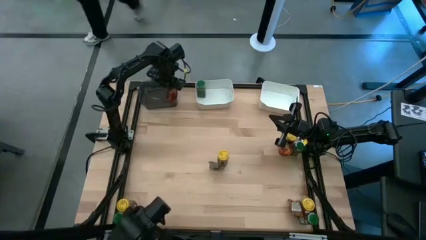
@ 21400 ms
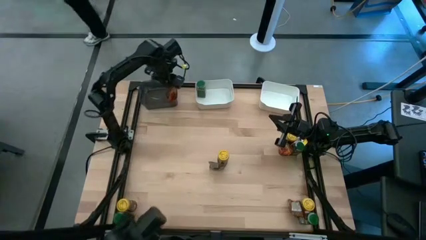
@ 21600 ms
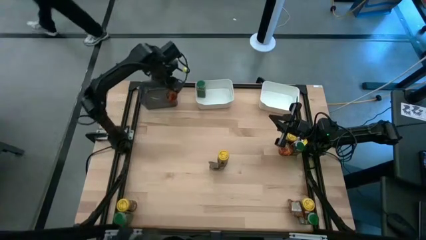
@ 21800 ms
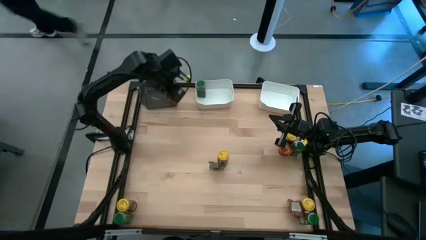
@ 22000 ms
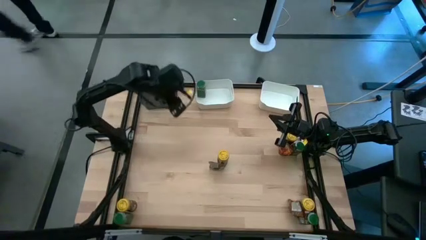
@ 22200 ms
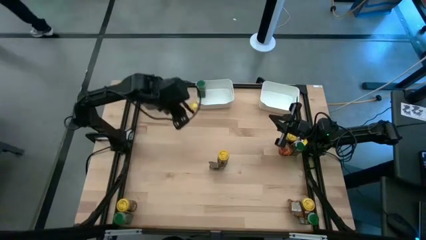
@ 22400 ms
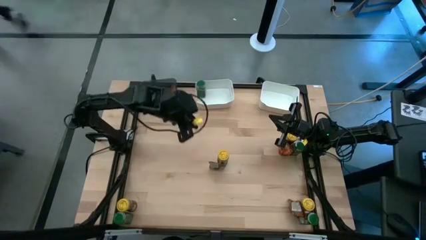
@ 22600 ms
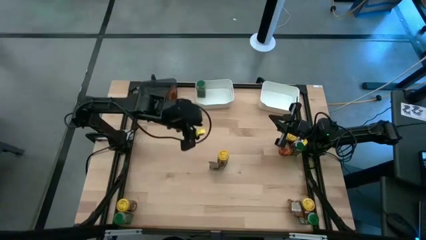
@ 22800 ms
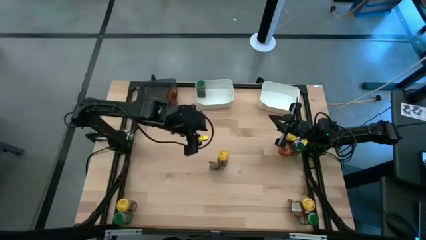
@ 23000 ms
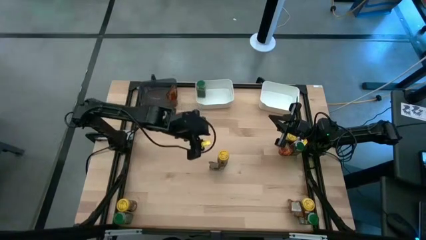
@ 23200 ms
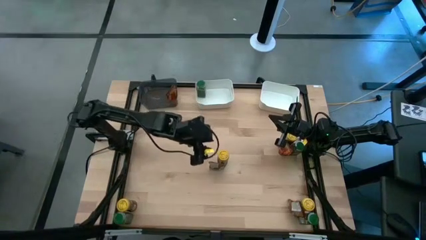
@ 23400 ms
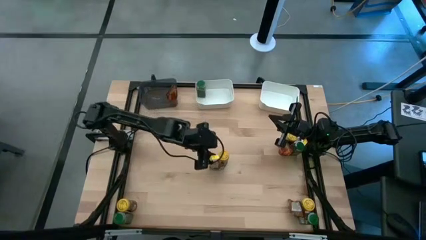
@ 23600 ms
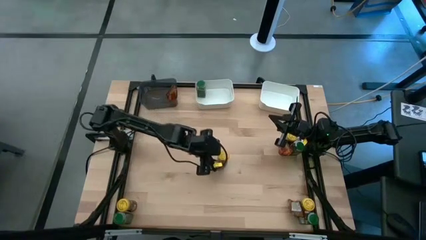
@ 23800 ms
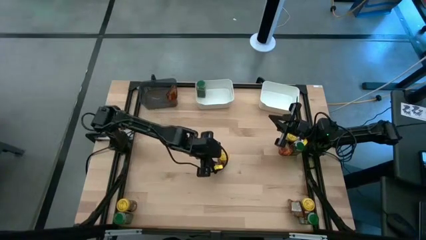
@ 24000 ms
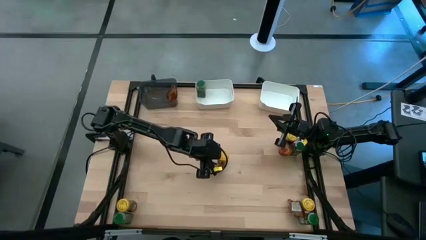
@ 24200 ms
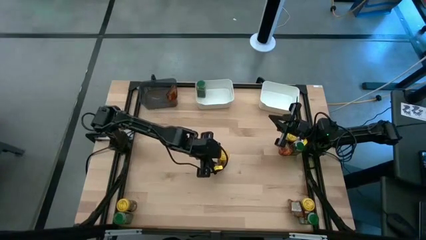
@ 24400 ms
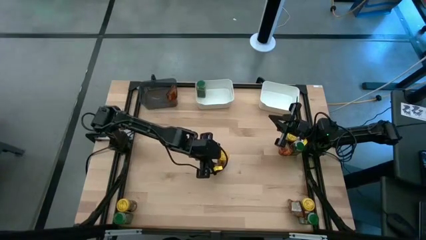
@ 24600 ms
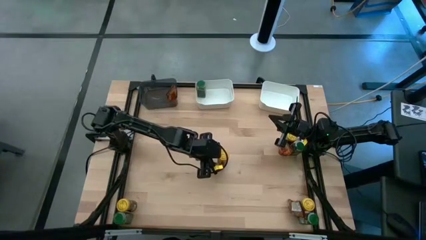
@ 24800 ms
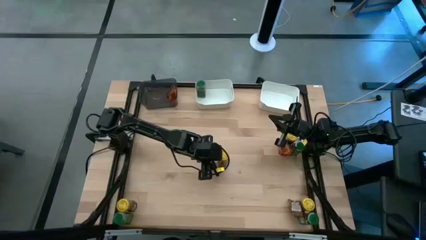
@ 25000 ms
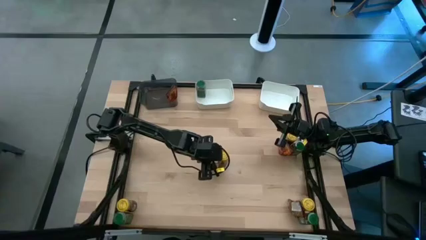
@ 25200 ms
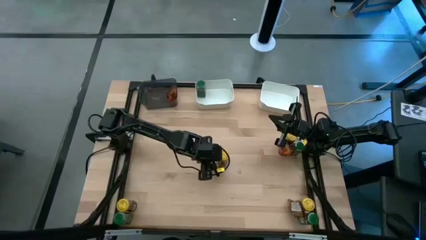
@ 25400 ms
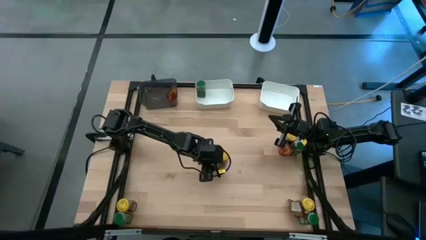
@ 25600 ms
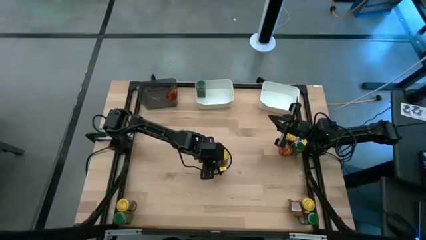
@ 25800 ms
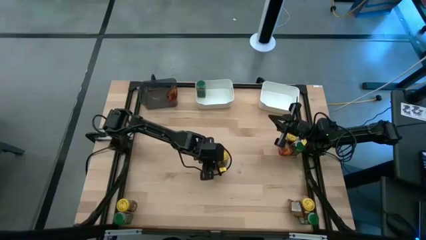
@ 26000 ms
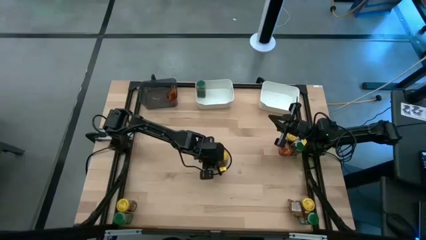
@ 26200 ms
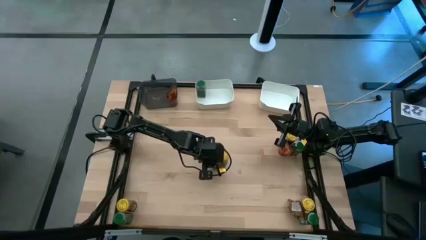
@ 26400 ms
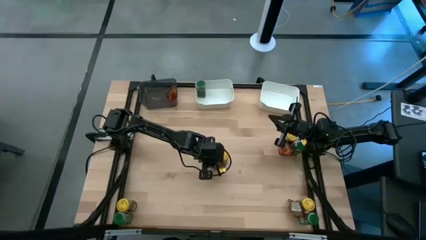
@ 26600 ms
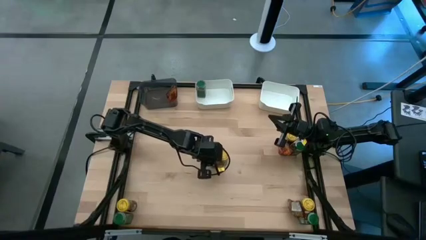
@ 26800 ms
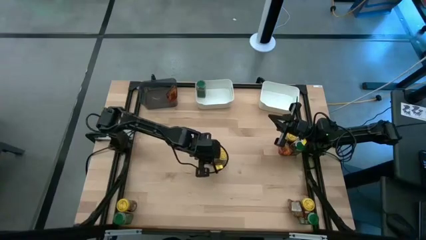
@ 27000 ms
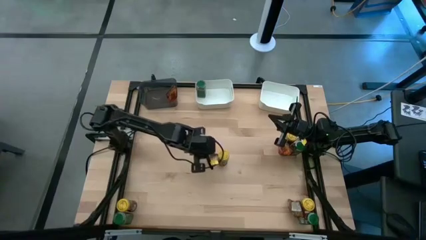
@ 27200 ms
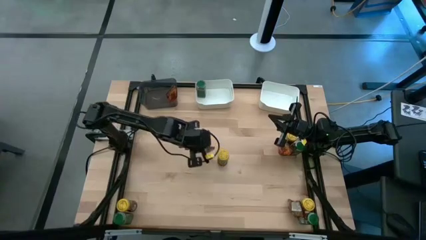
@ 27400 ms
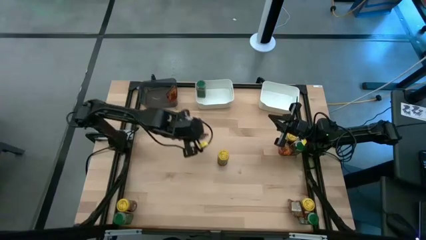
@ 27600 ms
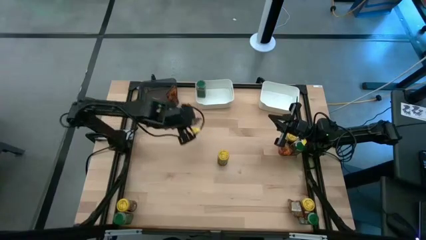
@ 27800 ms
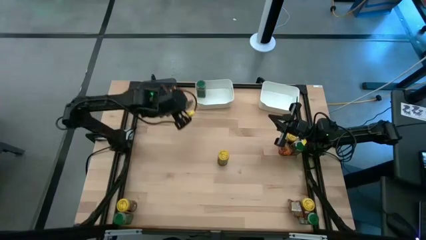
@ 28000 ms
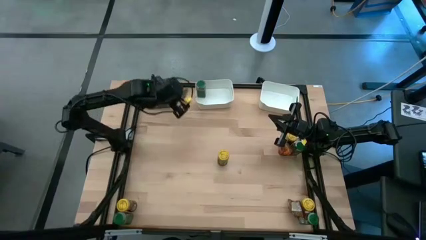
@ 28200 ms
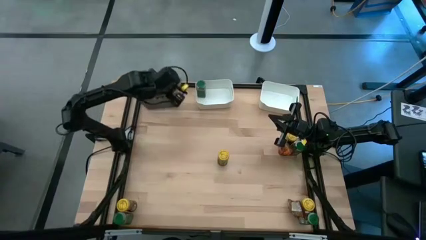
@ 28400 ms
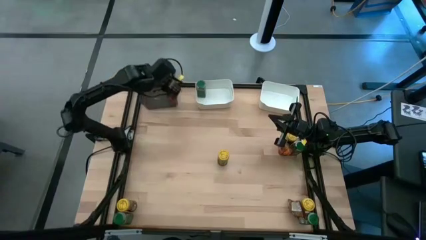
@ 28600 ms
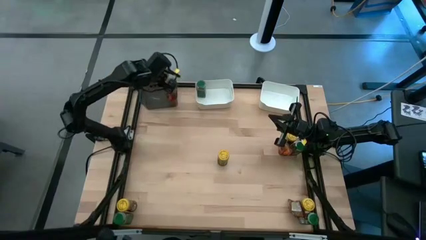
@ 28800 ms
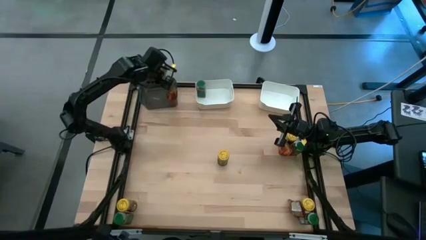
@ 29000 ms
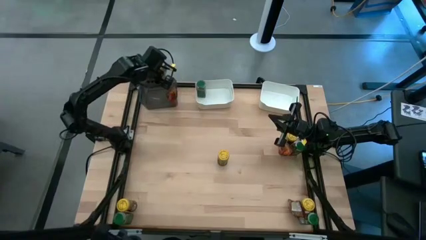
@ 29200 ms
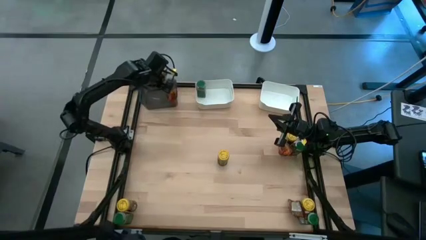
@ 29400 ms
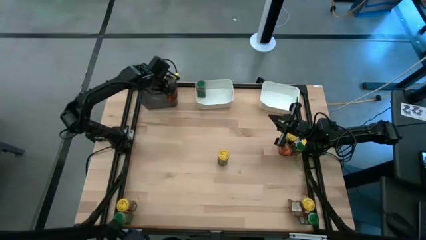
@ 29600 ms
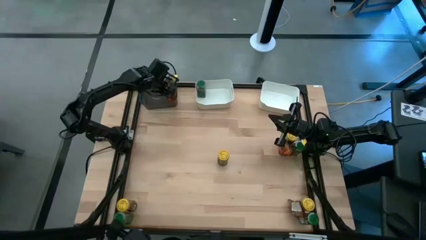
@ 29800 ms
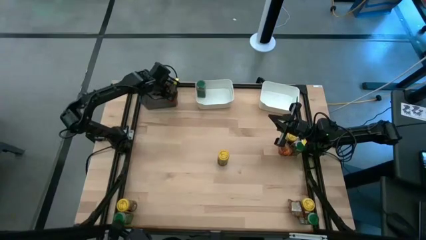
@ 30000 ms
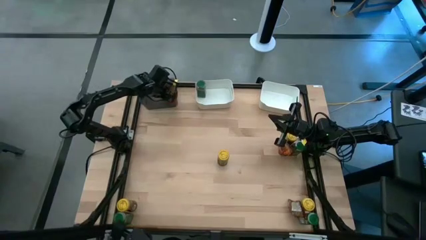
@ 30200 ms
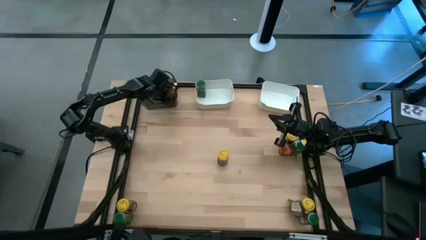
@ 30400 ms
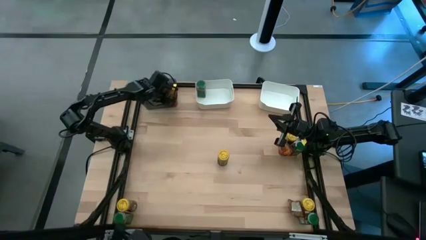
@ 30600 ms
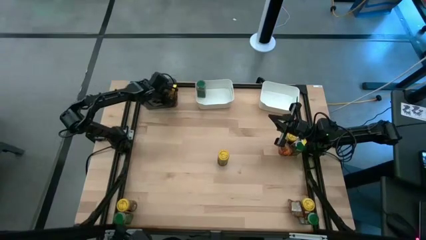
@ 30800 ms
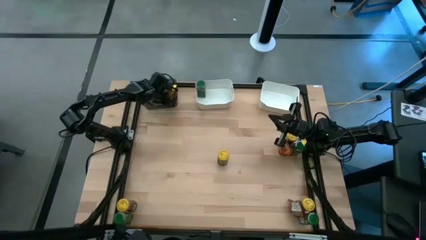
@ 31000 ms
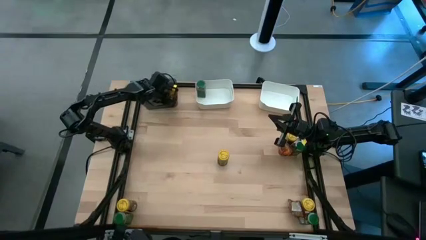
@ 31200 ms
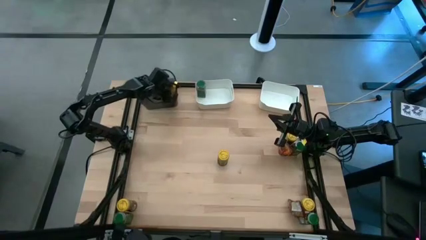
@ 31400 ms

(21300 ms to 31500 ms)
Task: Sort spices by type
Put the center brown seasoning bag into the black bin

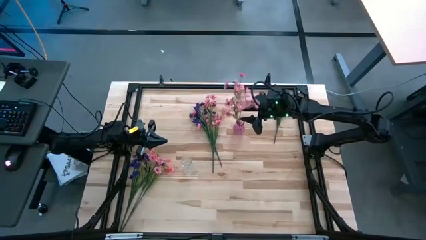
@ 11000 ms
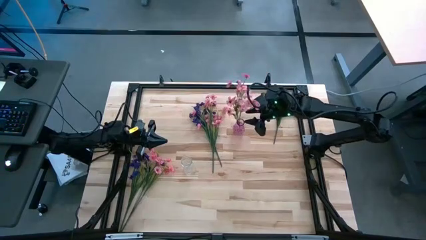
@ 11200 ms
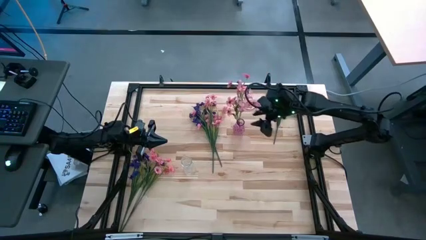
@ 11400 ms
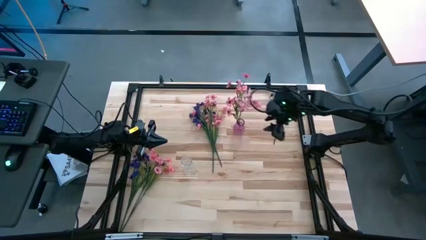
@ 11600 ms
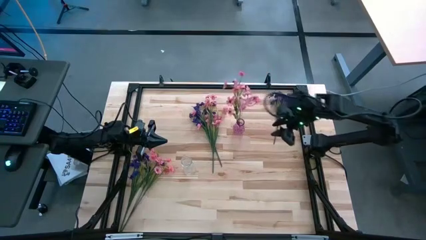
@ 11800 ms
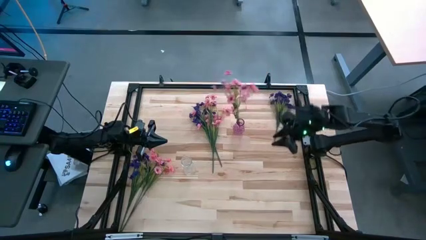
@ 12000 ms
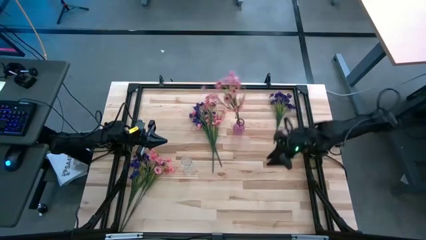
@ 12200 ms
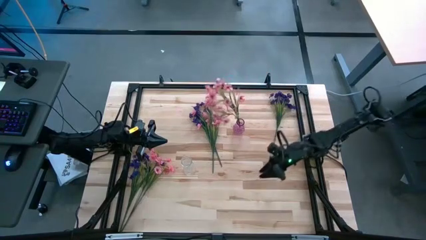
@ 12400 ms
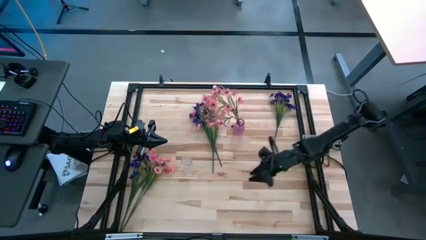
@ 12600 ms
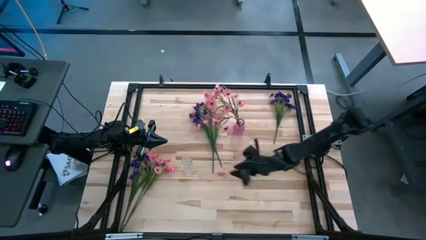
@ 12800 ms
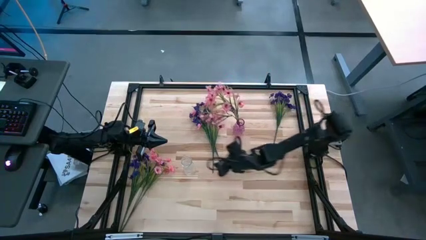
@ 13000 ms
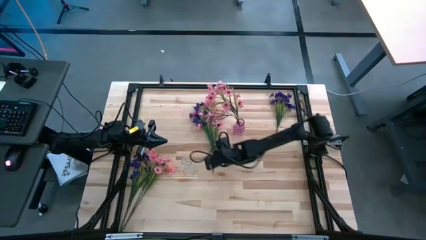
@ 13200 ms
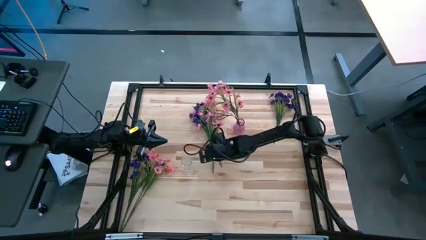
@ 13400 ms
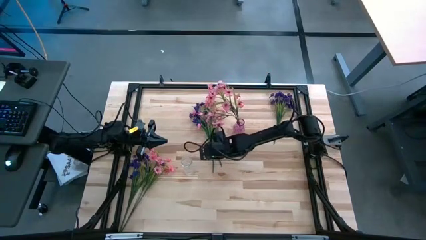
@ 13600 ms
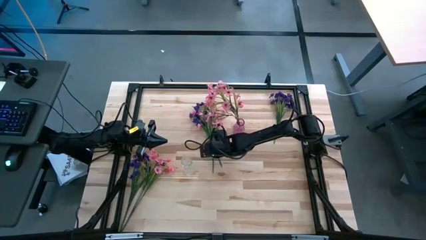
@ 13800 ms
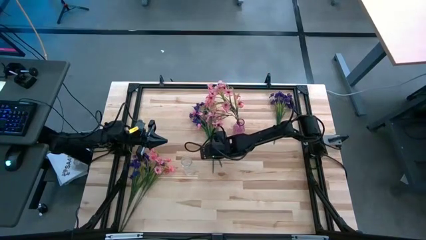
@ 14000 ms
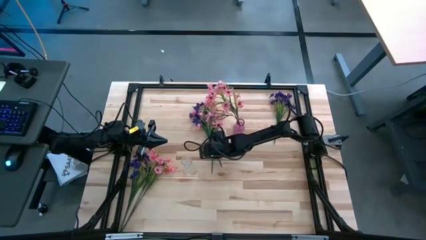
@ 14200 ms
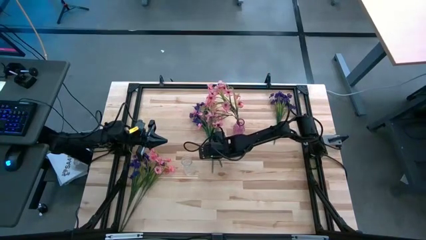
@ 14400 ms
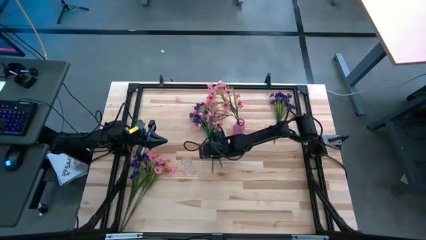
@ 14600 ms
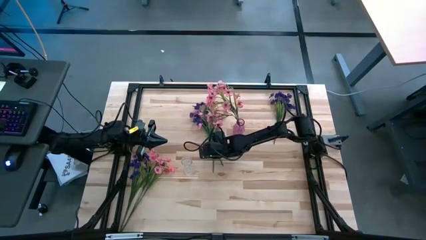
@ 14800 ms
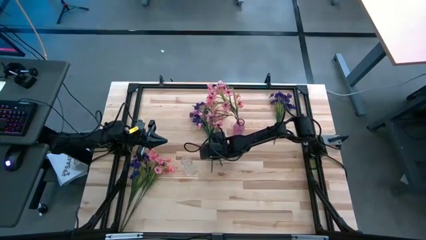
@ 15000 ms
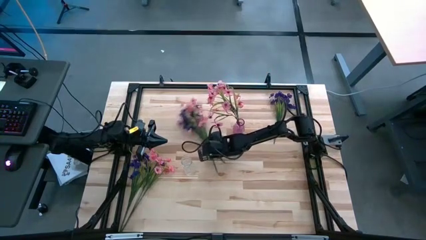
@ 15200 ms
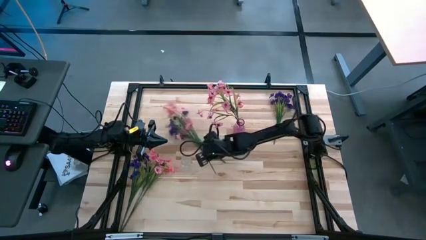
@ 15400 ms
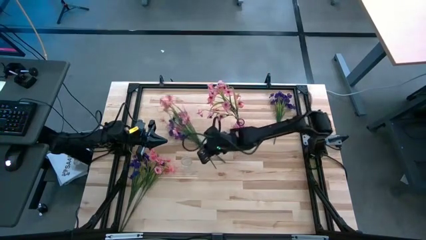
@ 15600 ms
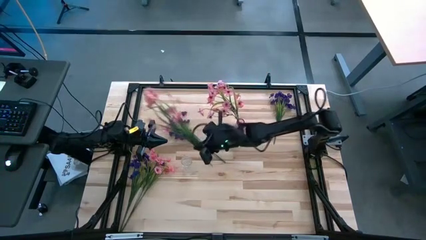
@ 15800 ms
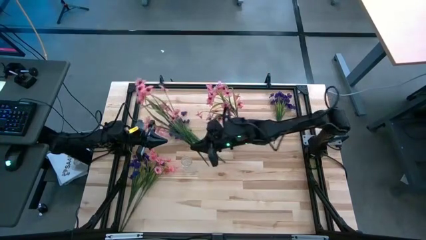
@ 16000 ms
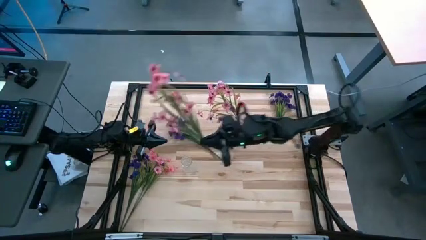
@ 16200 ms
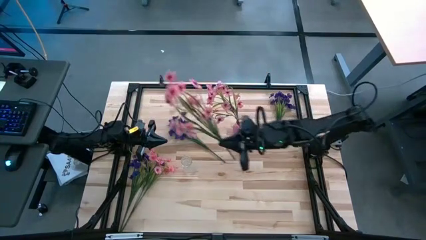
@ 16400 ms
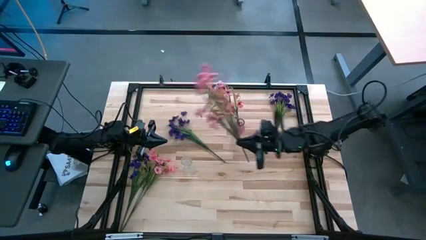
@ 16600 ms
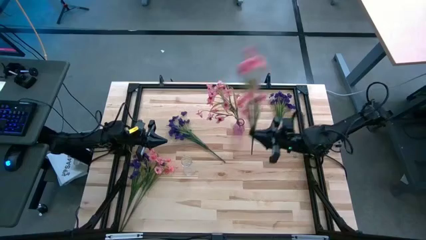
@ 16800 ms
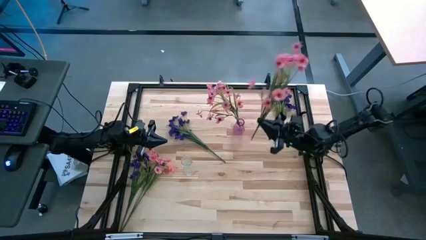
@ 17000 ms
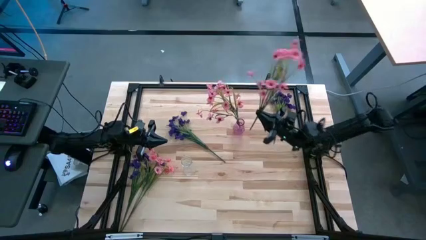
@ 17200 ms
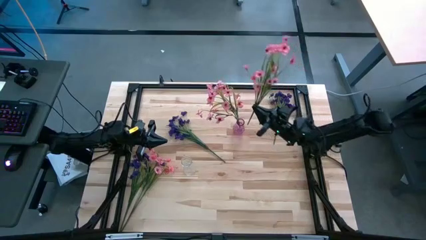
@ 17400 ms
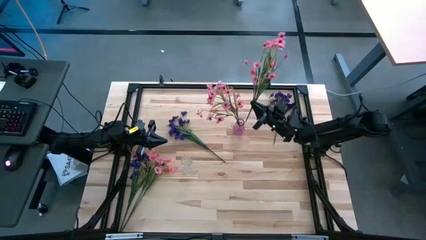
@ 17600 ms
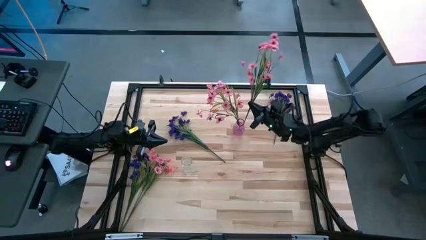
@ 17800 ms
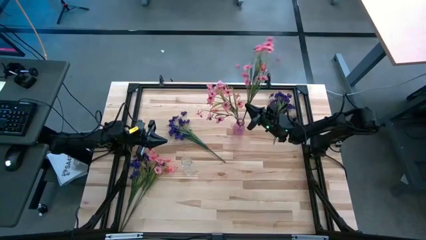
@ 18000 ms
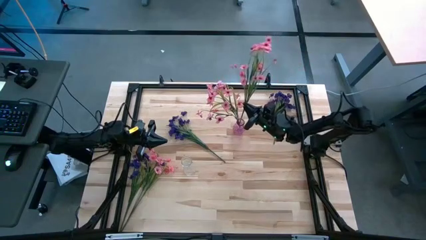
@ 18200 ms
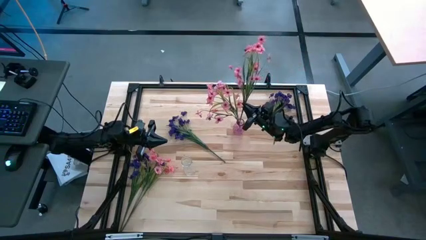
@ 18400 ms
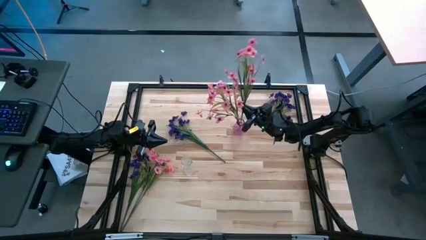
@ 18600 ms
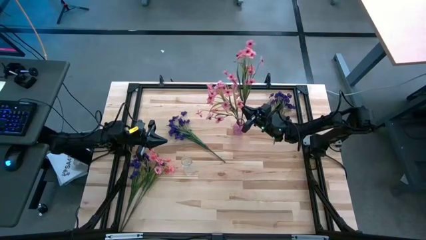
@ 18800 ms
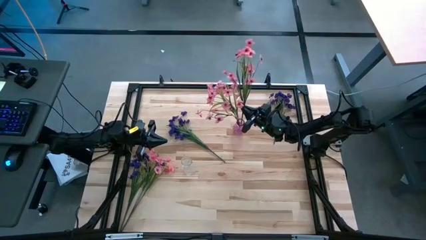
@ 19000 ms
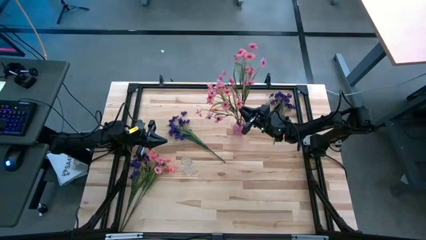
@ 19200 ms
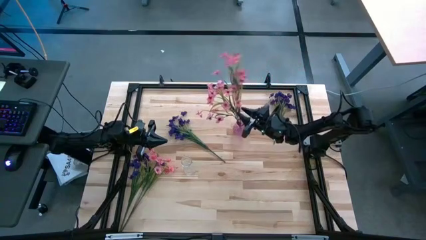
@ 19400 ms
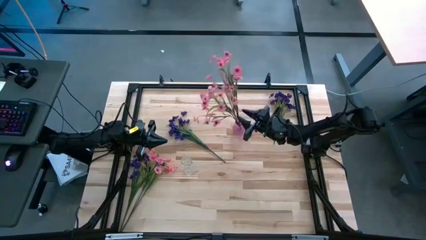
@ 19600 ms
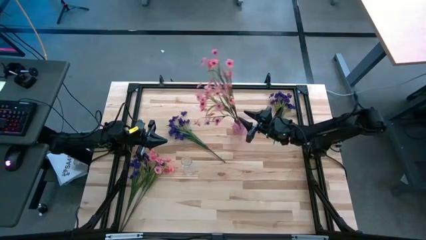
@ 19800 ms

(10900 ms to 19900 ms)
Task: Sort flowers into vase by color
Put the top pink flowers into the purple vase
